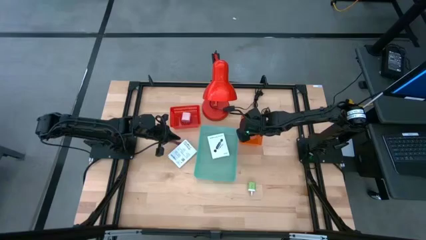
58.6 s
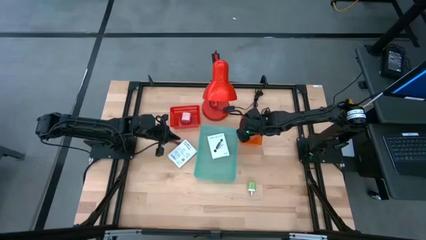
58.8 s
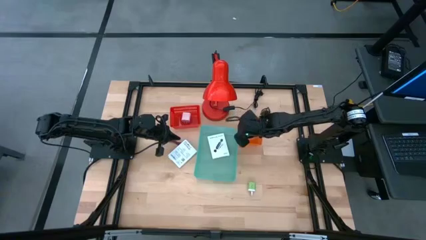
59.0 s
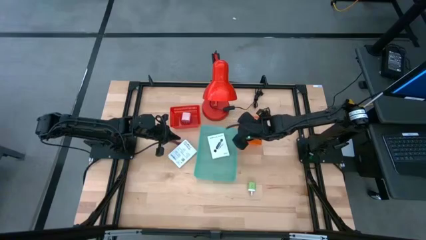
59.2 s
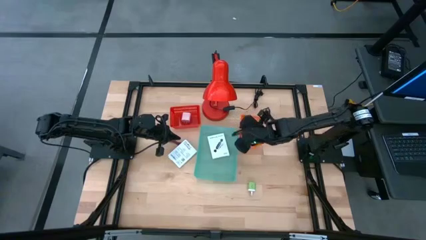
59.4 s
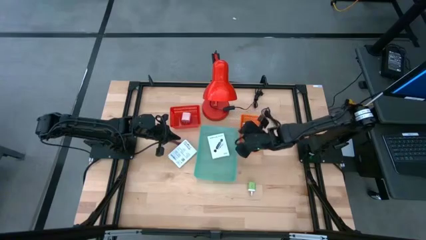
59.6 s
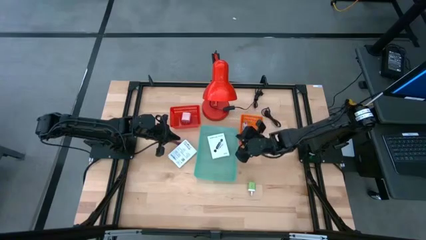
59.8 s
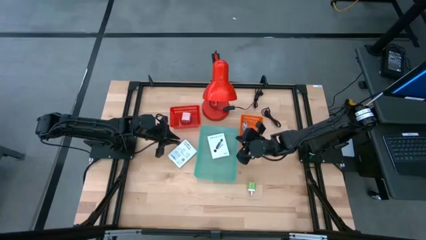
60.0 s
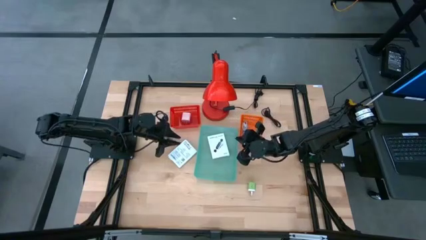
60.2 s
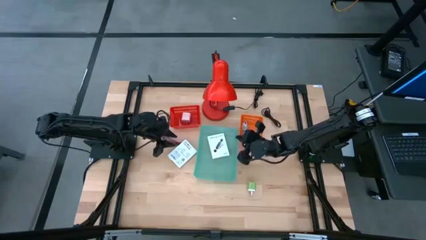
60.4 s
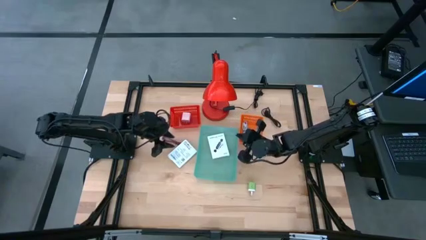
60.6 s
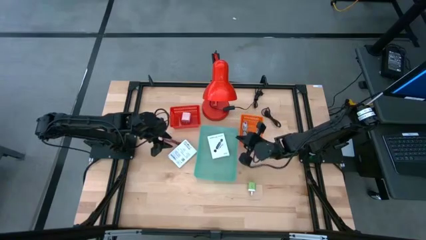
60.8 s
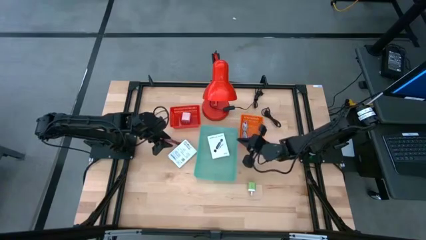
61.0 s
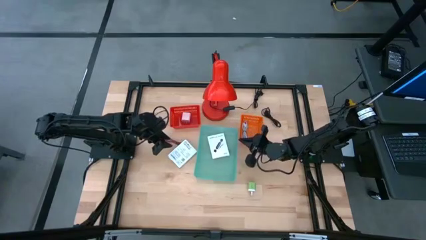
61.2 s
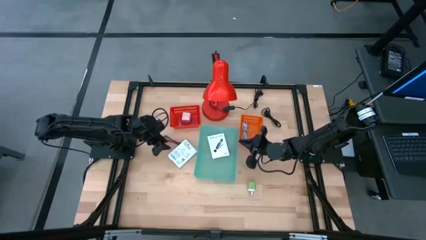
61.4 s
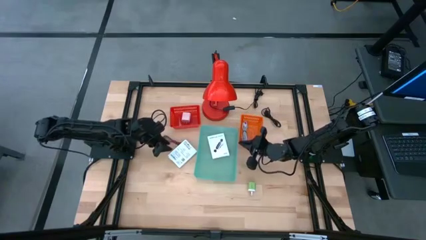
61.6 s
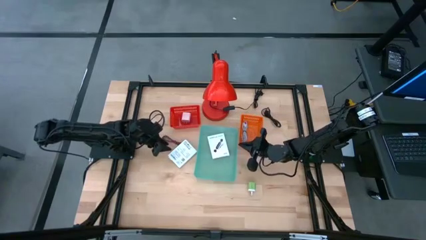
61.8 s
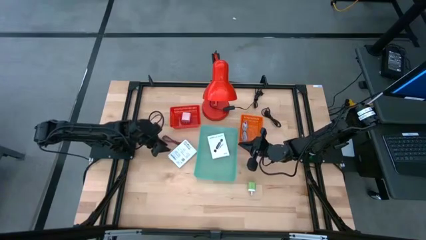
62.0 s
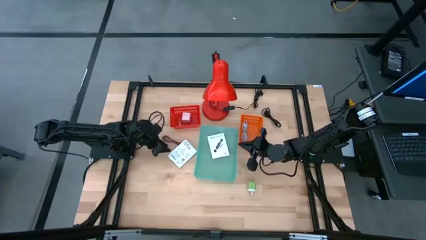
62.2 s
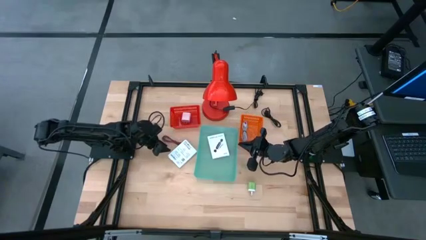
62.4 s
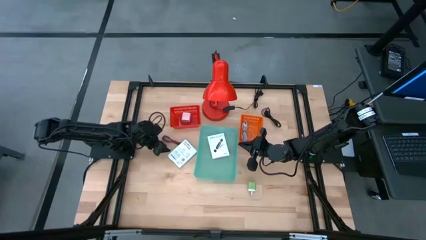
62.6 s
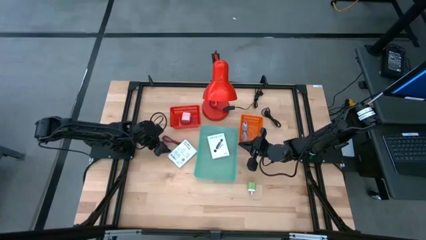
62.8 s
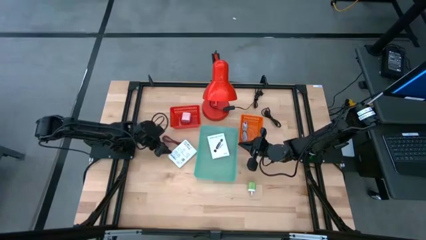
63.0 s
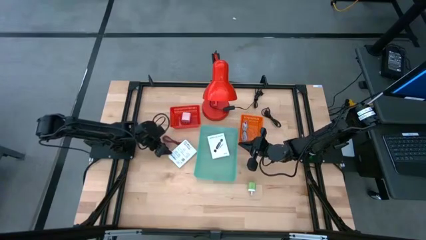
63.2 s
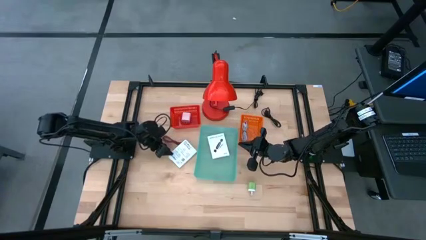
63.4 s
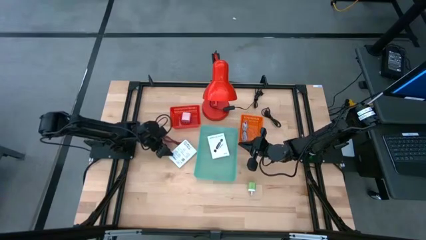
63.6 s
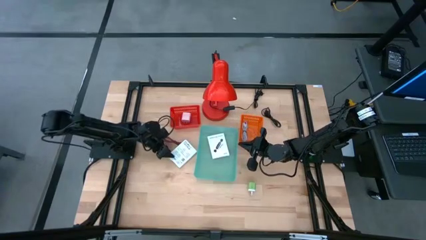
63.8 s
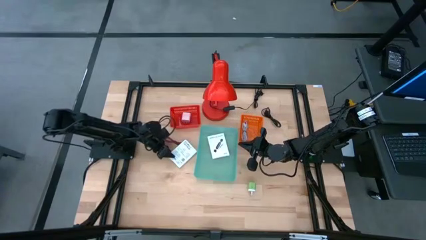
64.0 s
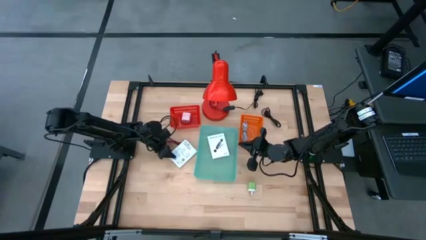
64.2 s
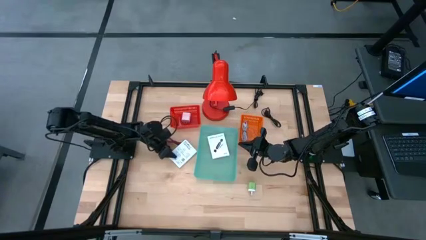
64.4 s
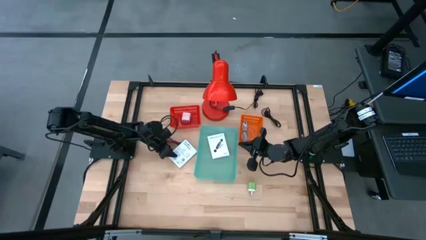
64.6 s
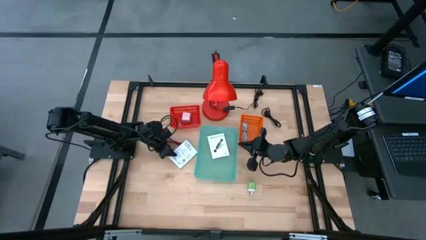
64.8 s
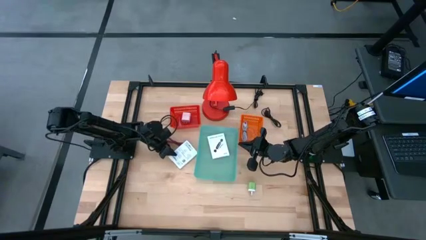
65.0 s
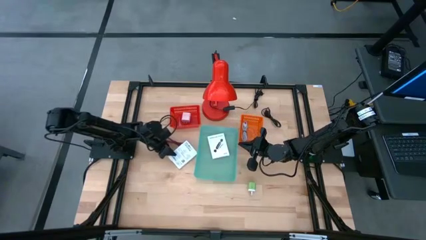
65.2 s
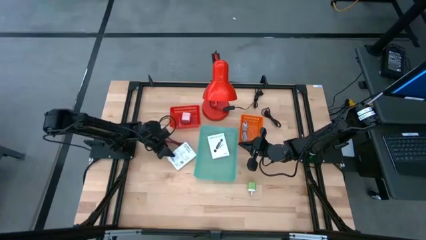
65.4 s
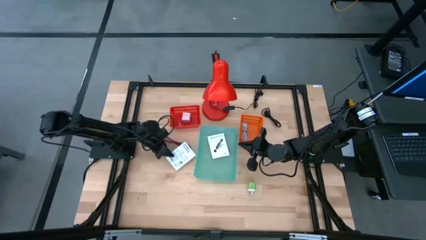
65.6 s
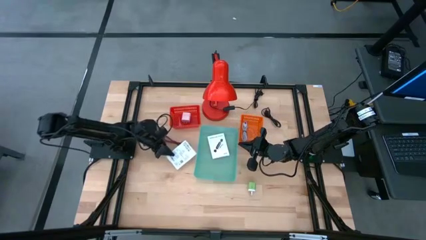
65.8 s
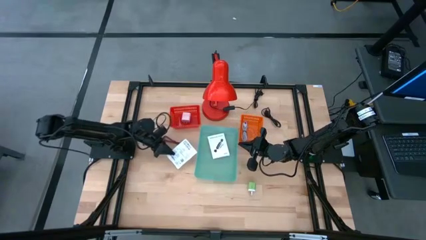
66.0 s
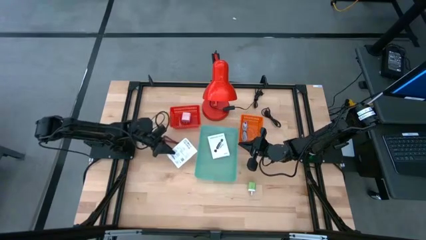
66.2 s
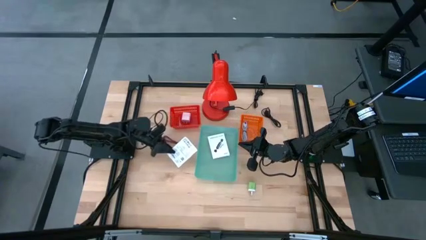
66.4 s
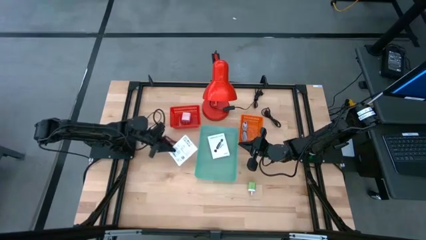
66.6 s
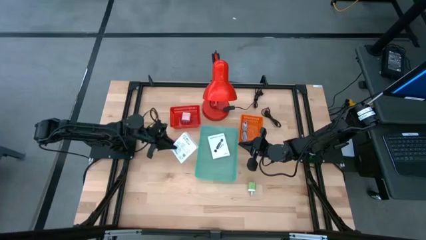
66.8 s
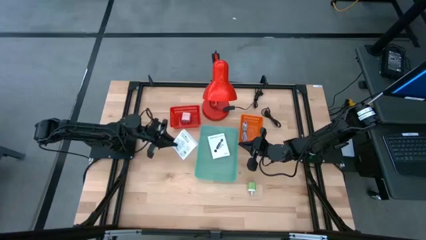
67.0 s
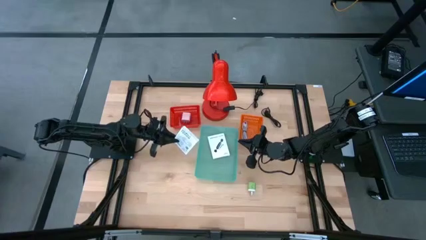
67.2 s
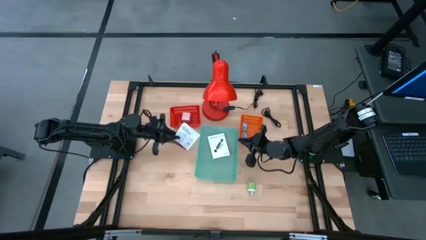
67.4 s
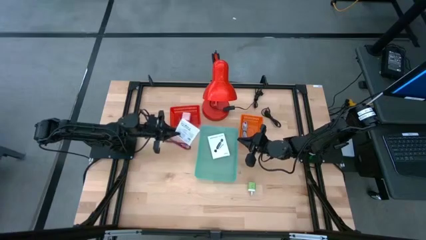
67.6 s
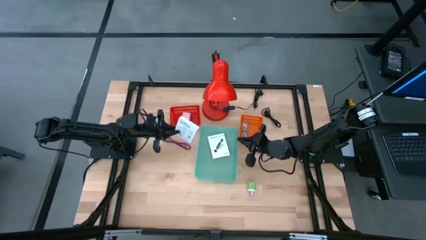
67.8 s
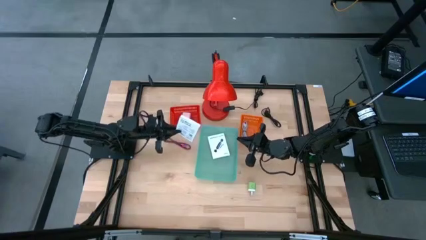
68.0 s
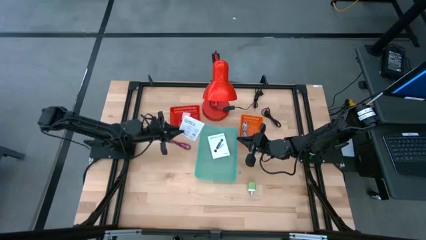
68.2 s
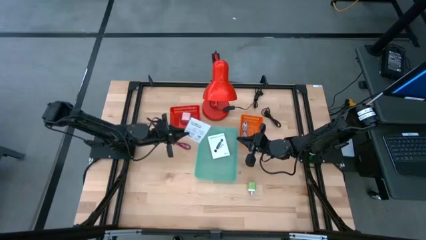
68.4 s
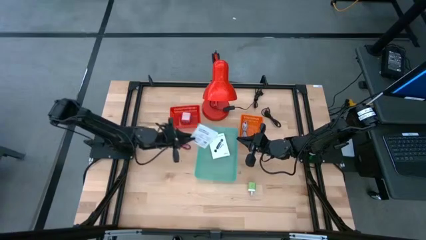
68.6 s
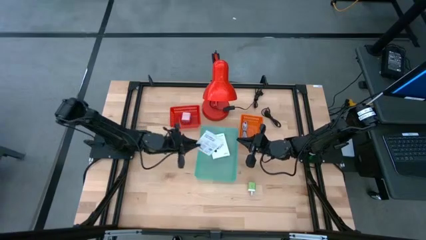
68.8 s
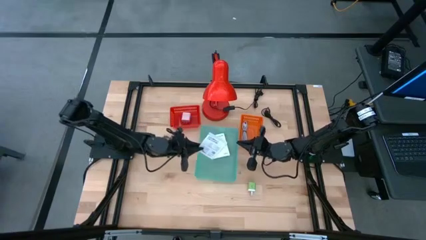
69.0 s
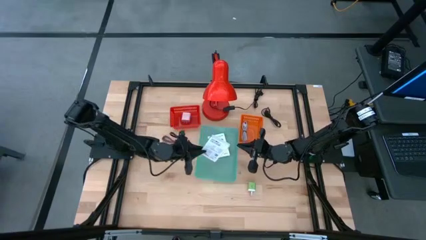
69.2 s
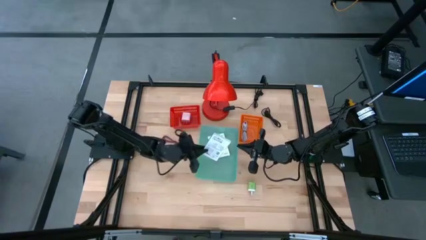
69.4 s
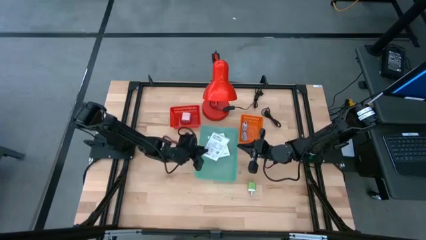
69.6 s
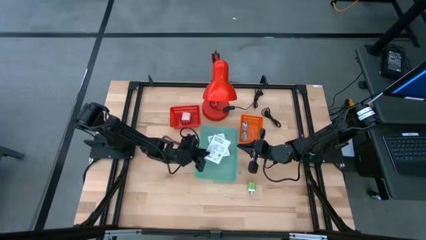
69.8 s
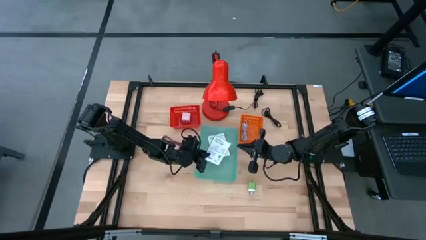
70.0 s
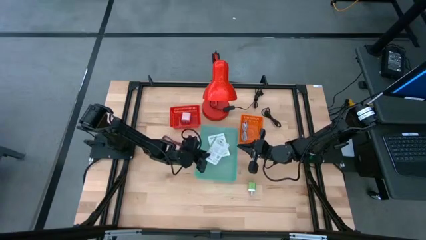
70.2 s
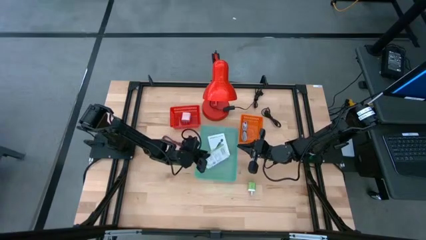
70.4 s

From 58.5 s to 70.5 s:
Task: Pick and place items into bin
Put the white card reader box into the green bin
